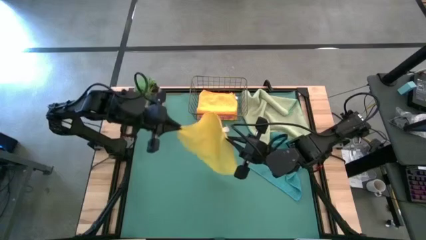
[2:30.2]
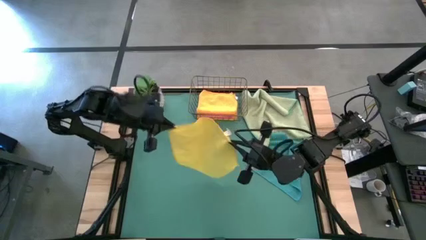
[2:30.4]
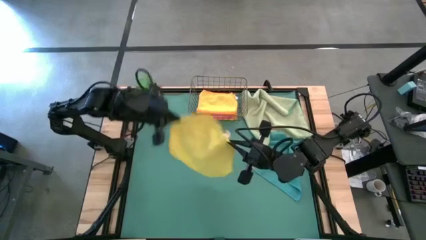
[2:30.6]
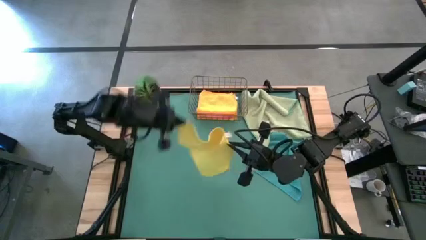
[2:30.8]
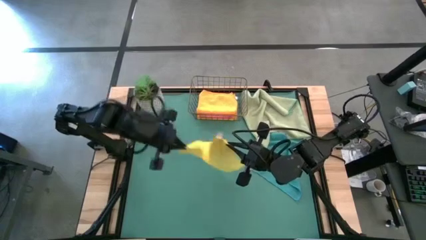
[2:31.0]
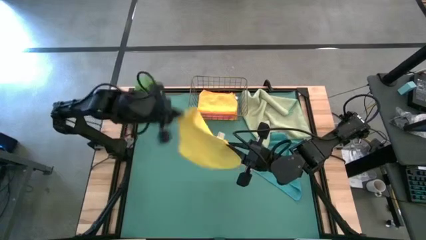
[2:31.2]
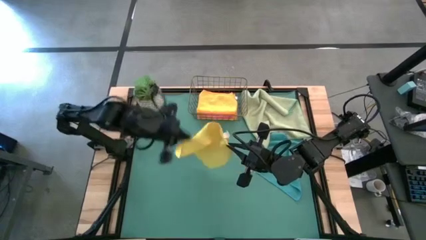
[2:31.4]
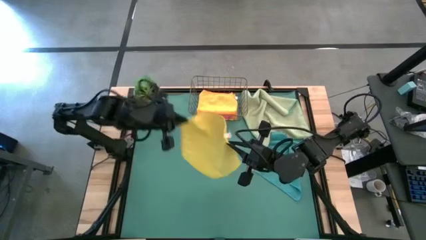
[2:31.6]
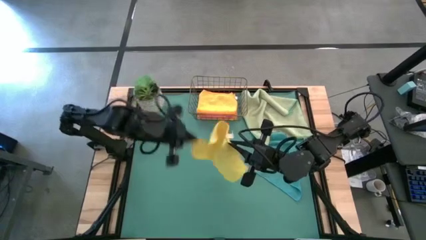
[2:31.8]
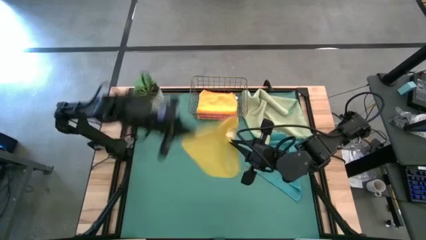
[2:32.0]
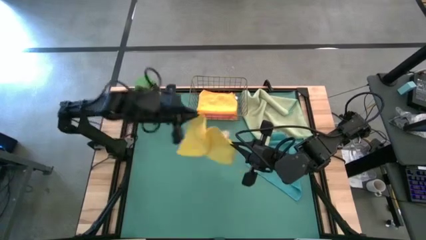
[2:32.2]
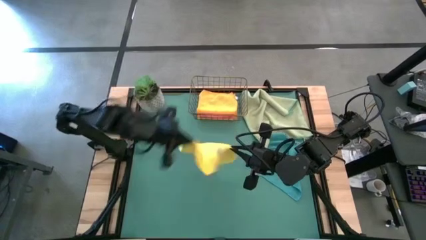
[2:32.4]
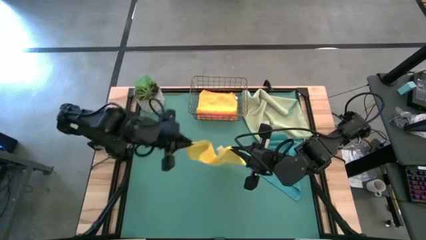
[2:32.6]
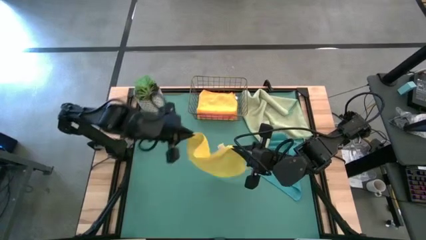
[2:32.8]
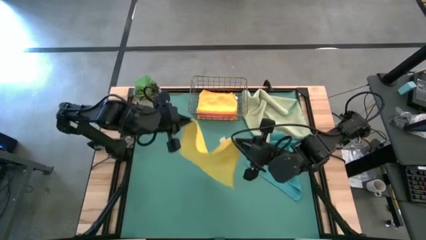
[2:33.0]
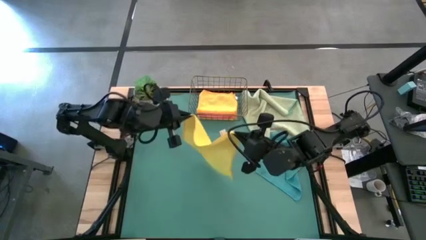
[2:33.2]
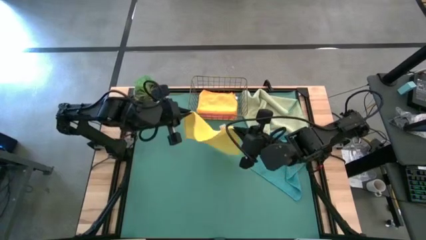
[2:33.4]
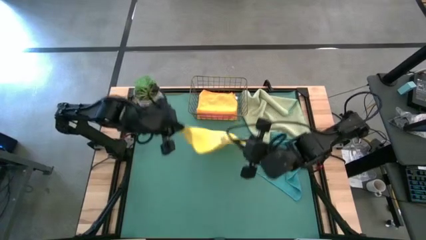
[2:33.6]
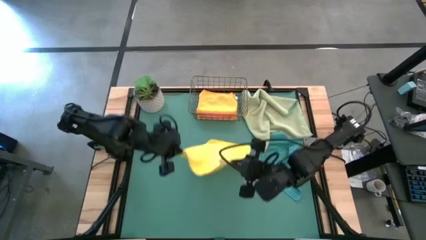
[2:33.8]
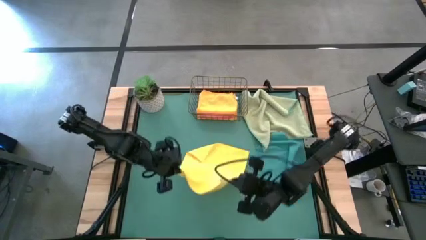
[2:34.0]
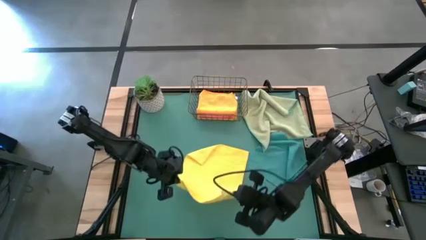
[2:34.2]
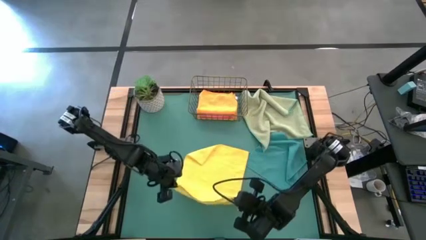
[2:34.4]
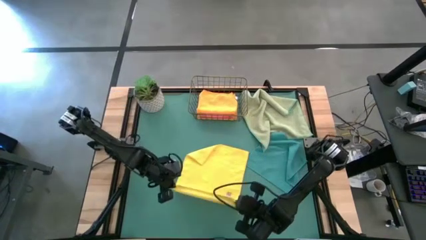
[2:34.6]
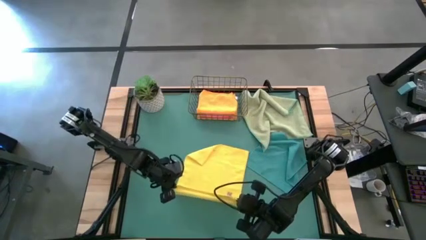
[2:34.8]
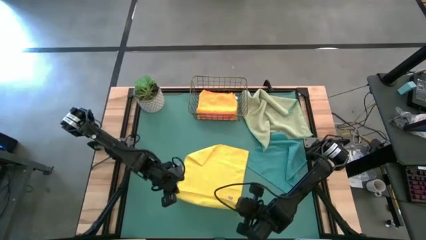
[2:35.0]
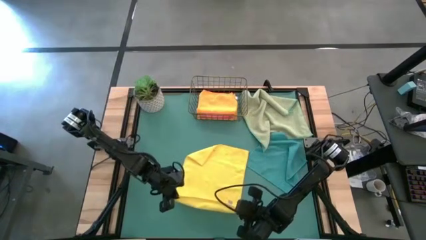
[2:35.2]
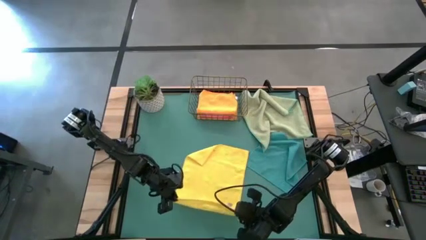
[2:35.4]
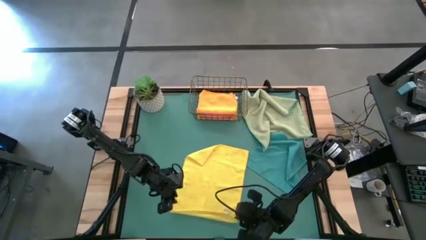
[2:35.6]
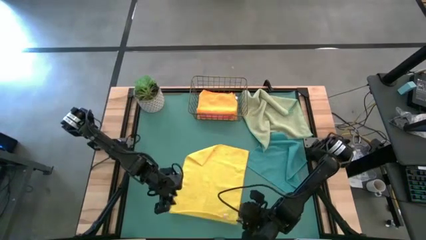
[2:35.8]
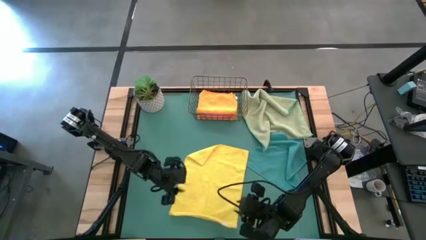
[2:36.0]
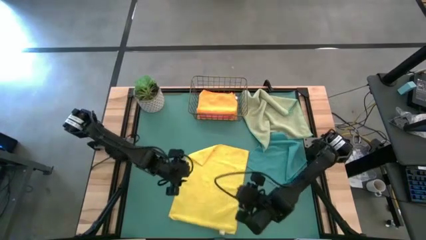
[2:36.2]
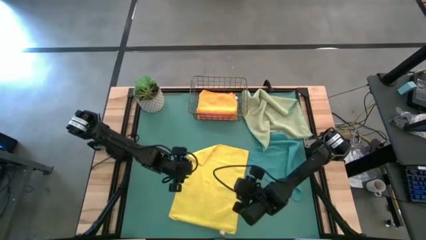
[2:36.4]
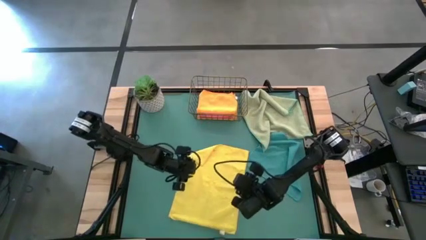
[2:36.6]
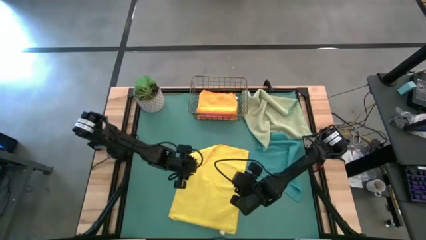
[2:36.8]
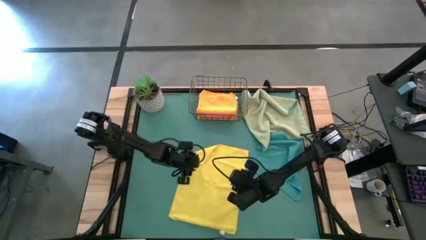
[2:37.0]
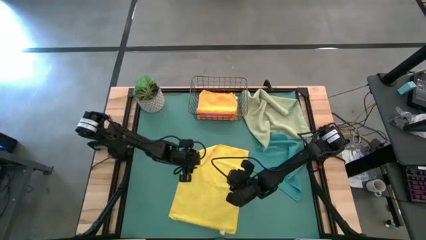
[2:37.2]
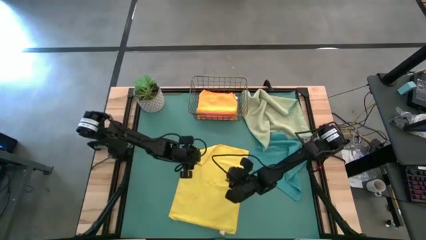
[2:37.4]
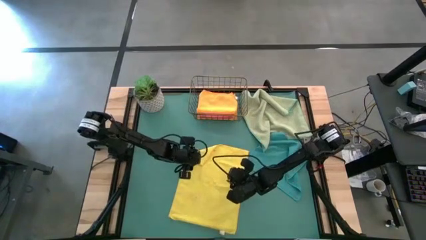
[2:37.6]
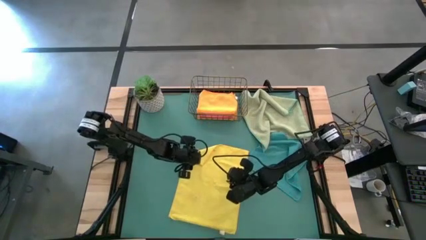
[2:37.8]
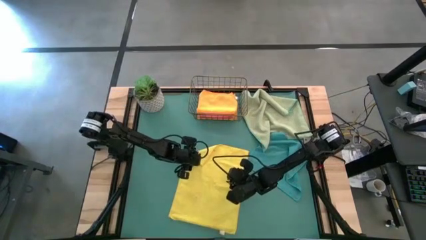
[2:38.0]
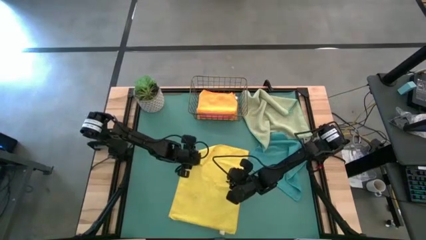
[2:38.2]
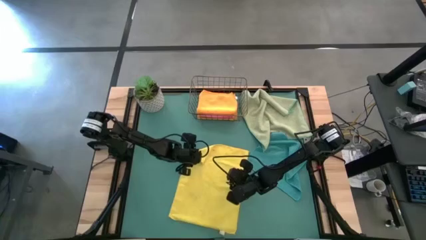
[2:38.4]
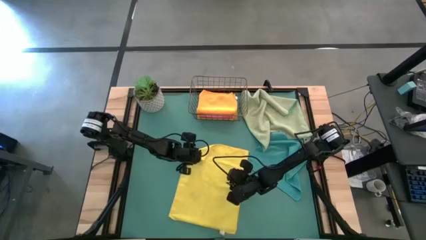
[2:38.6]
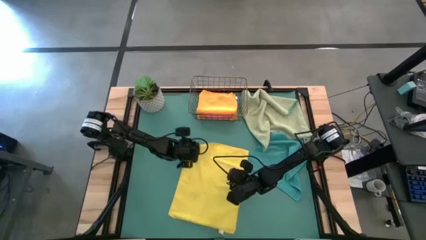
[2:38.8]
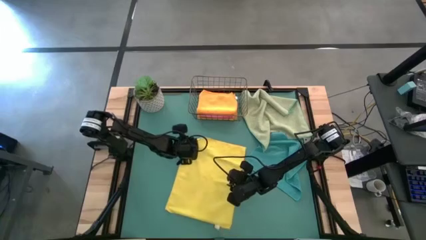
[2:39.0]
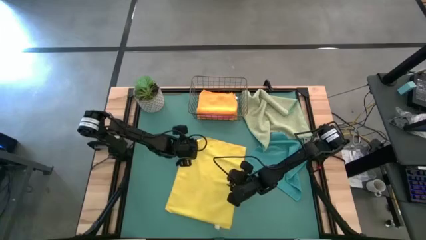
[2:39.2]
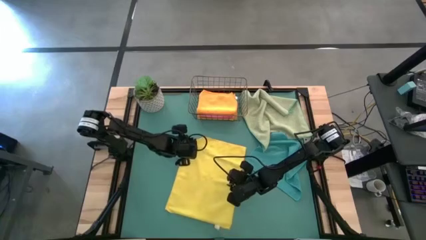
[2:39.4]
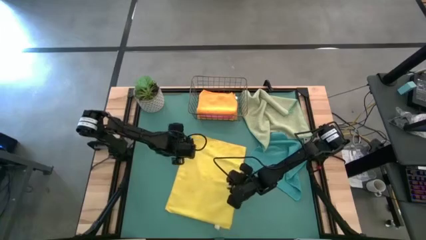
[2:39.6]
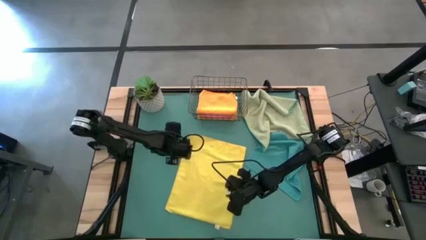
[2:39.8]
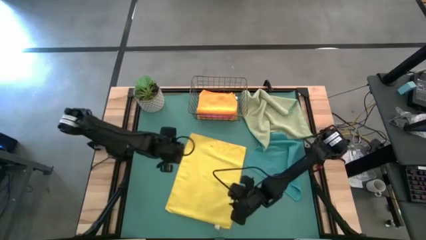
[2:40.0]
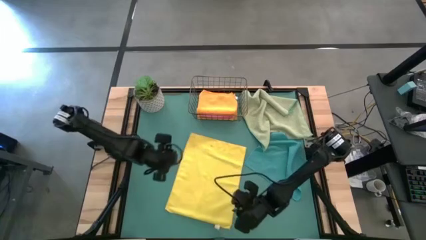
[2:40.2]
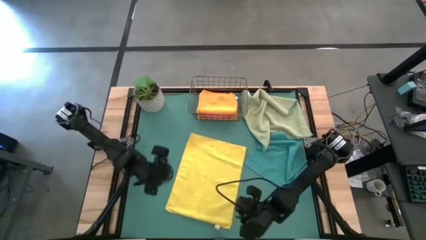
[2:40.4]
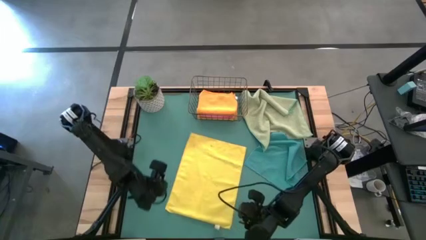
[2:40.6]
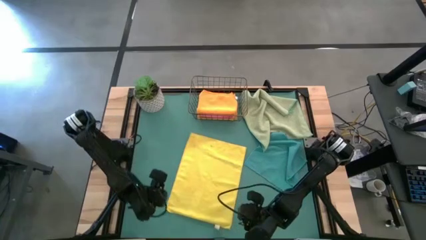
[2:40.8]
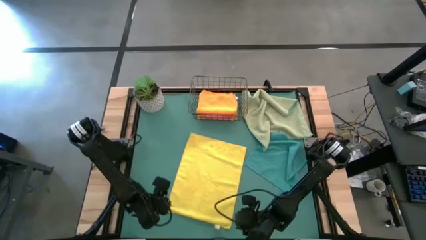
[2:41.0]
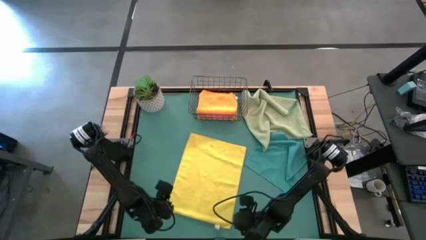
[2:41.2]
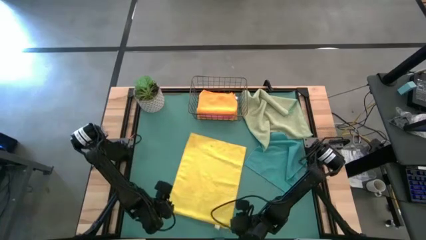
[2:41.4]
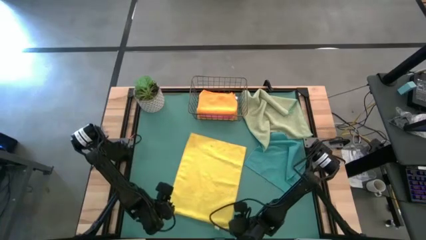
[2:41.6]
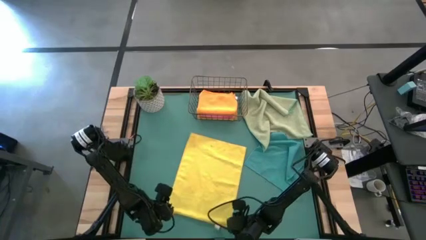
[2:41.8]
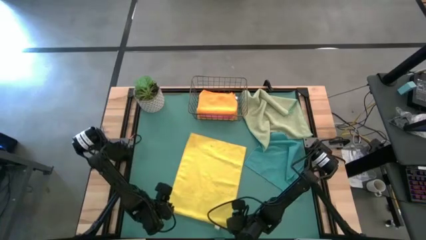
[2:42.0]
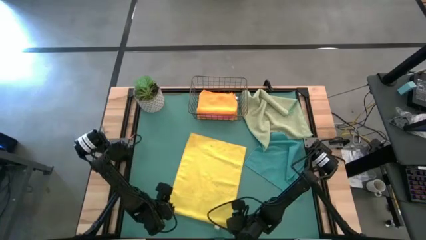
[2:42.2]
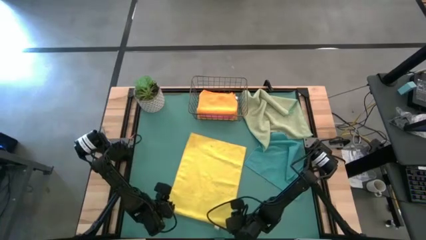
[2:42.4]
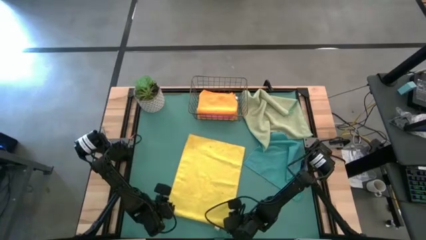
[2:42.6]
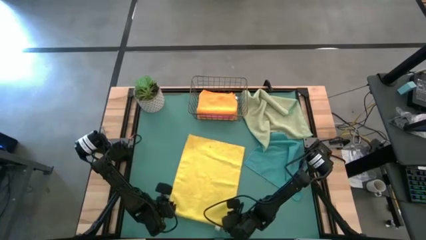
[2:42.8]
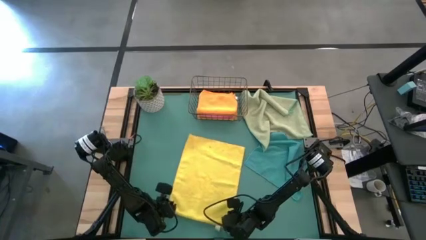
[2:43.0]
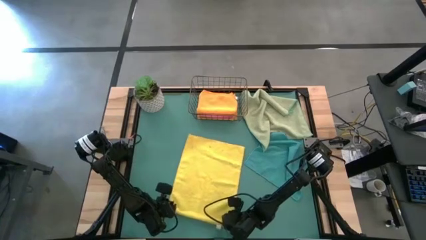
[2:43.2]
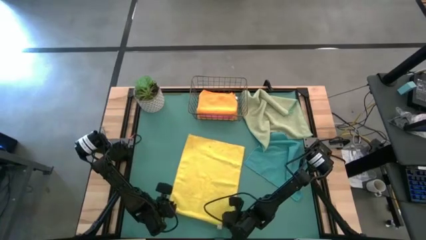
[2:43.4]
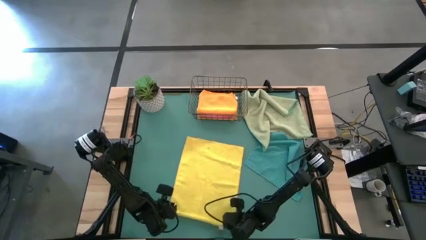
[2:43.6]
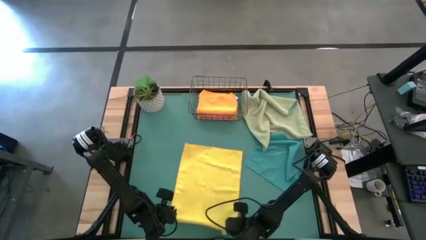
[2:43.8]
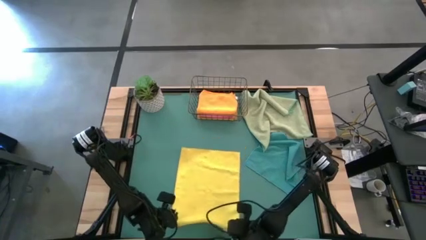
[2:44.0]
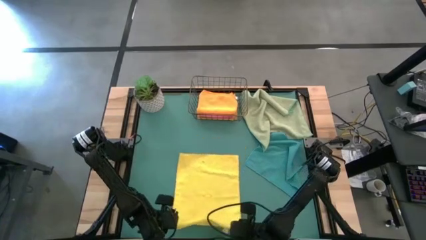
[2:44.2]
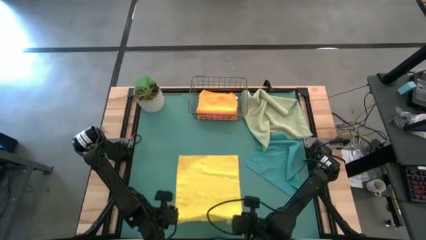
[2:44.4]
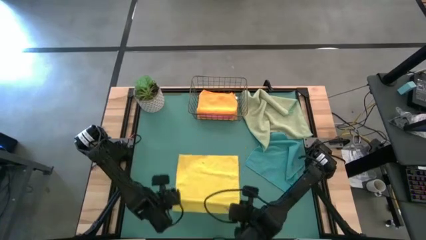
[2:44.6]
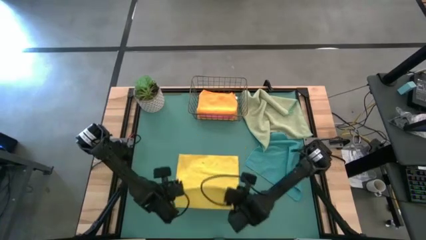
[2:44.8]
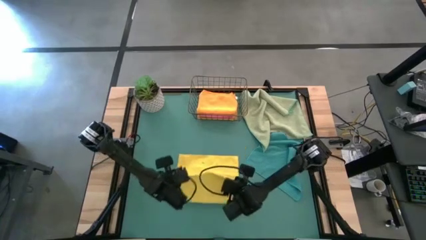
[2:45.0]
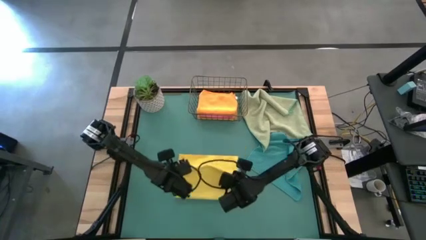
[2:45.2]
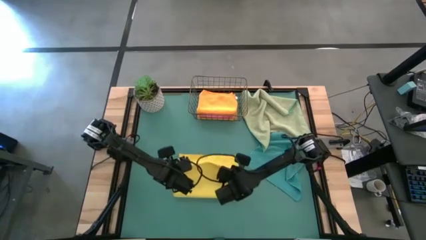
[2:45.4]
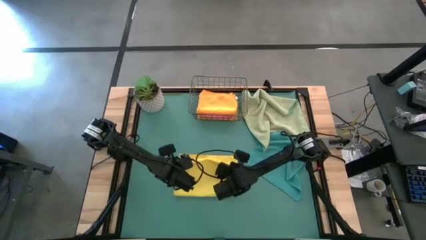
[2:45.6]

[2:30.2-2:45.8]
Task: Fold microfiber towels
Fold the yellow microfiber towel
